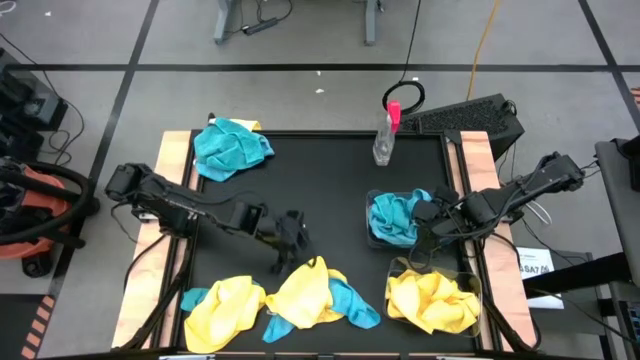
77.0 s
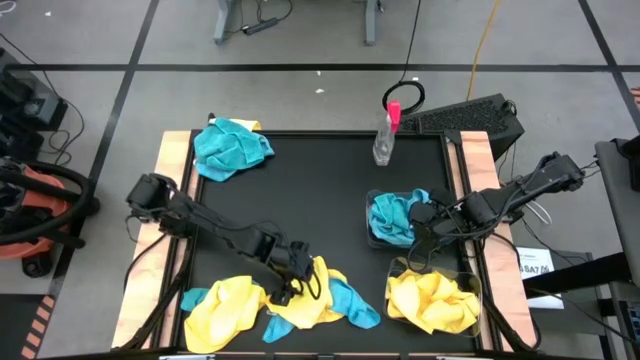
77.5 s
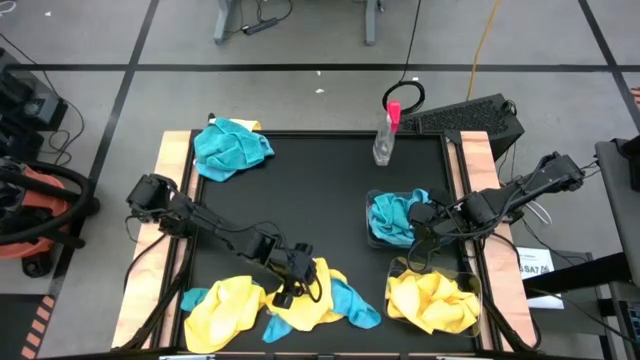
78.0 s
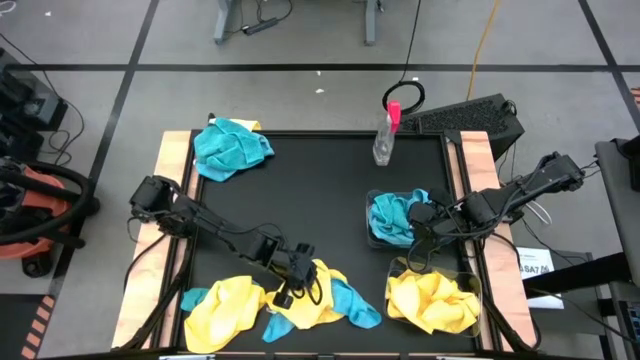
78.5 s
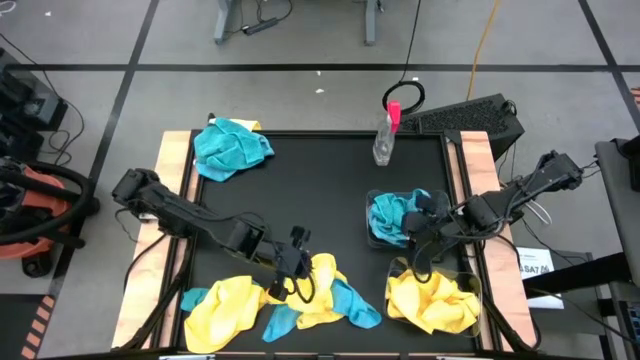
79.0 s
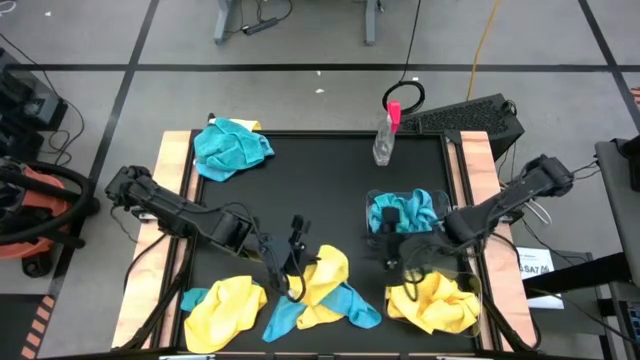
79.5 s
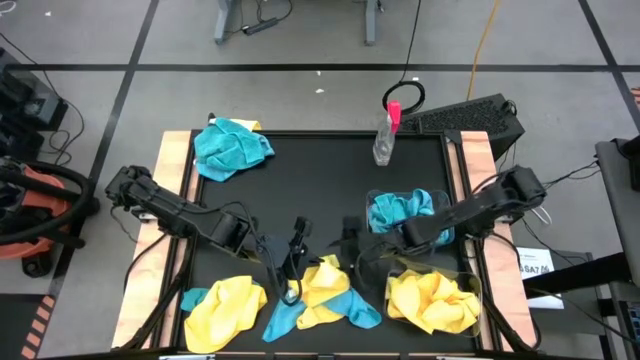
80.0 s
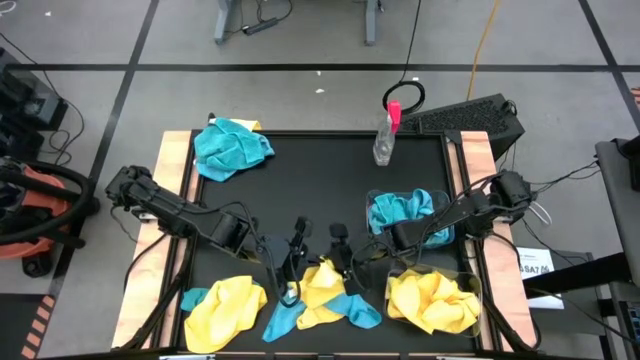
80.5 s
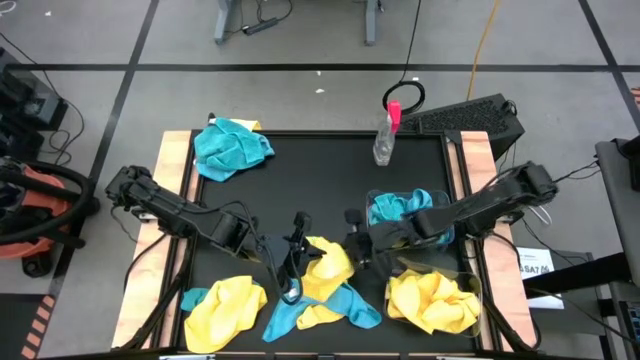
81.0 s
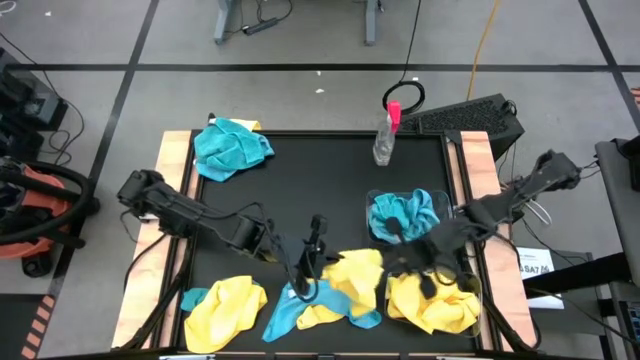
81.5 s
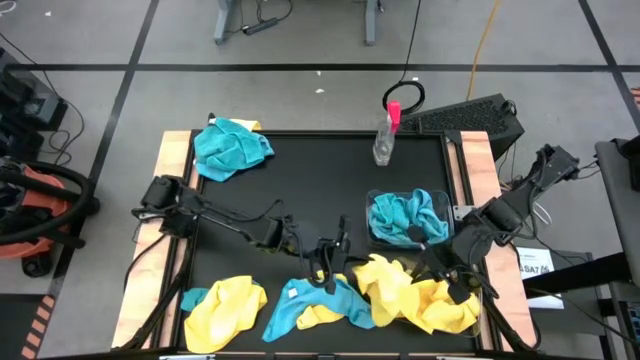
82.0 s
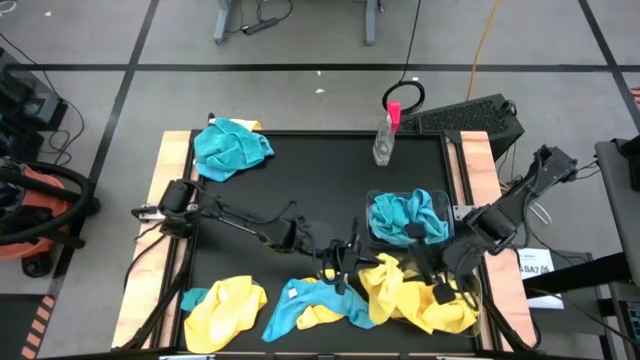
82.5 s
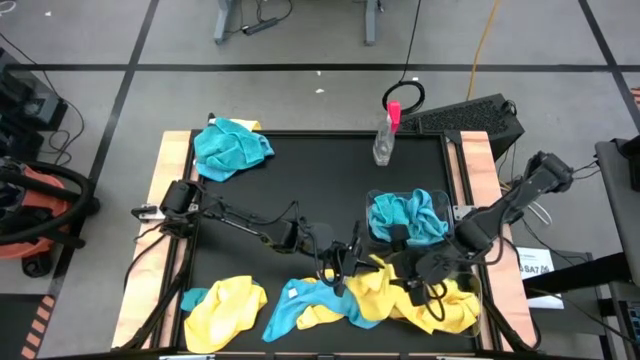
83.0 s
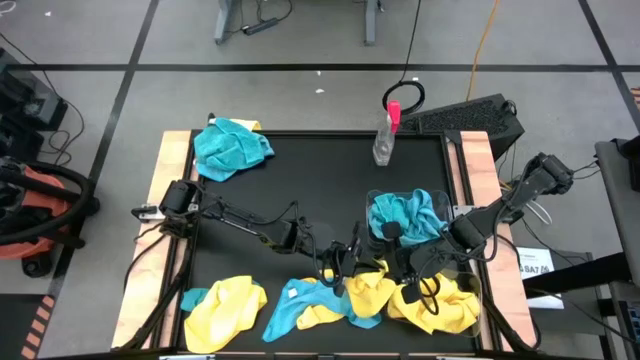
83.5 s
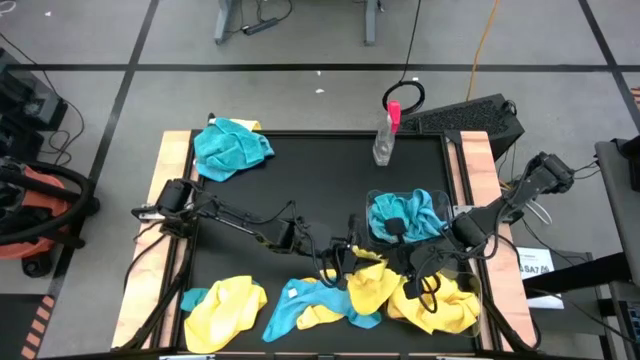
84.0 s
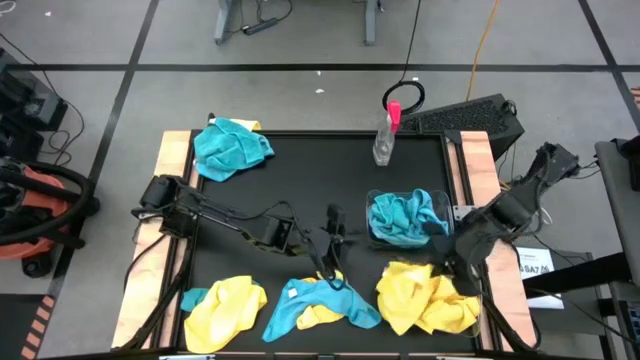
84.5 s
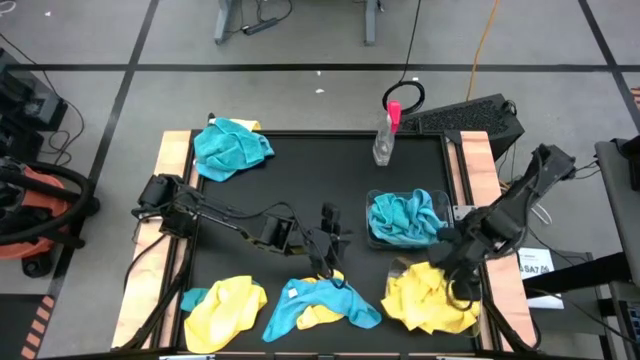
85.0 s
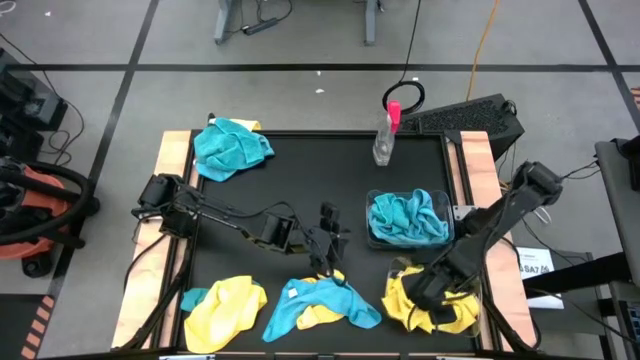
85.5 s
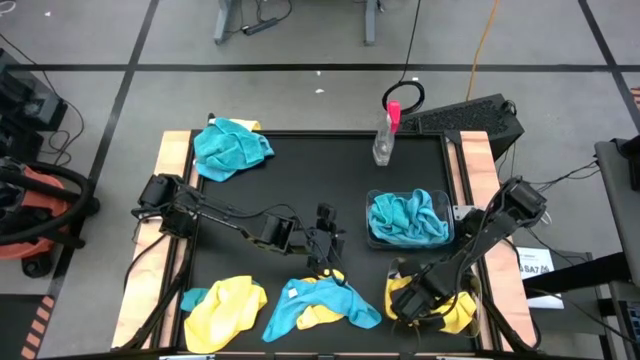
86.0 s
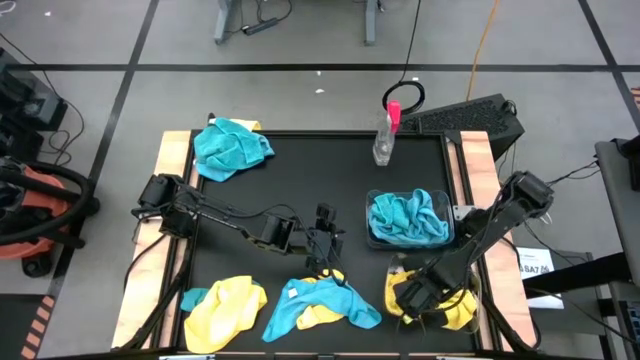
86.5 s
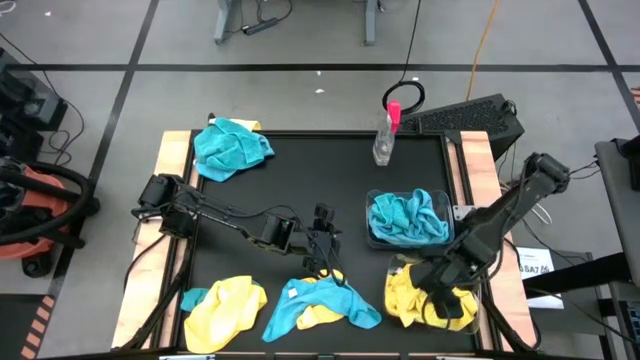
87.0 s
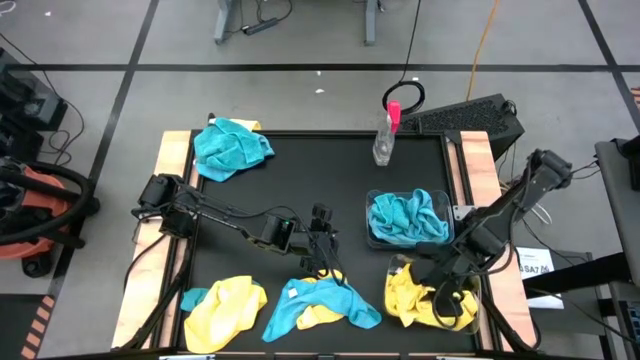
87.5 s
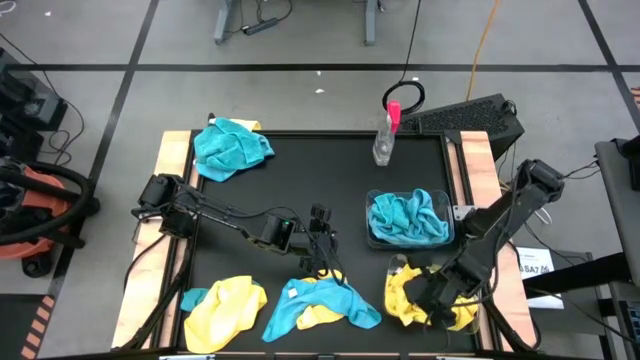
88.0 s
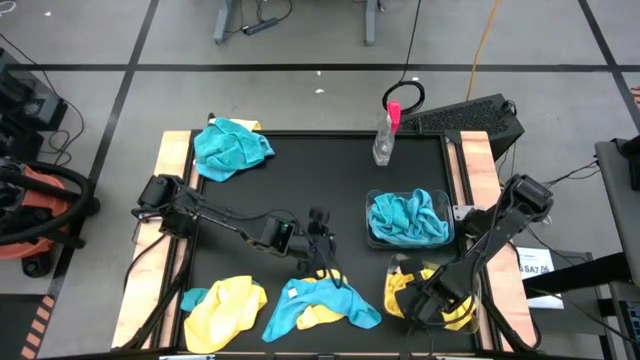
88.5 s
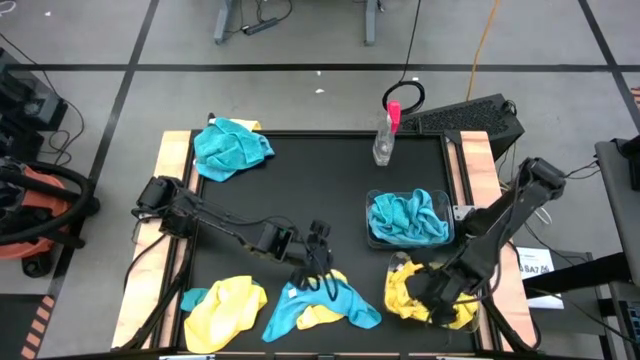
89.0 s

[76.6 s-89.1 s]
Task: Sort microfiber towel by color & place in baskets
Put the yellow towel into the bottom transparent bin

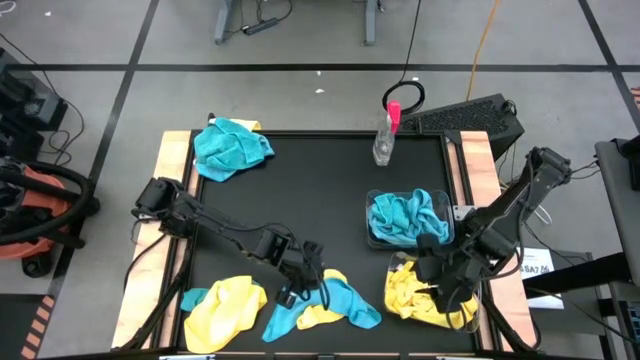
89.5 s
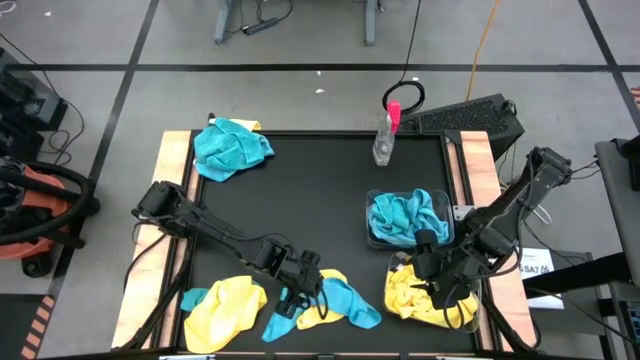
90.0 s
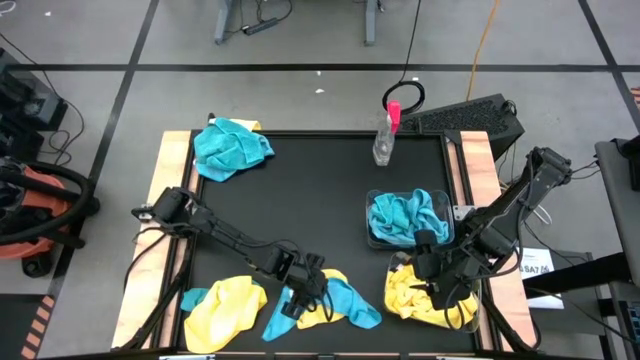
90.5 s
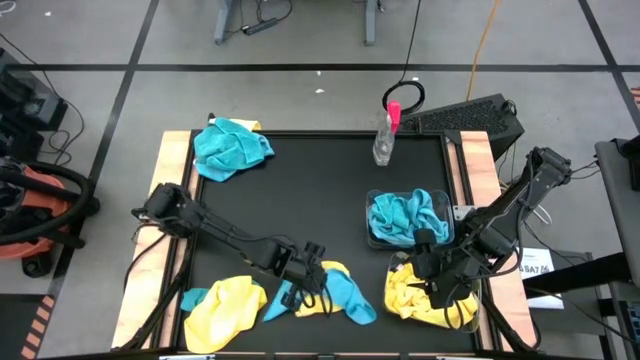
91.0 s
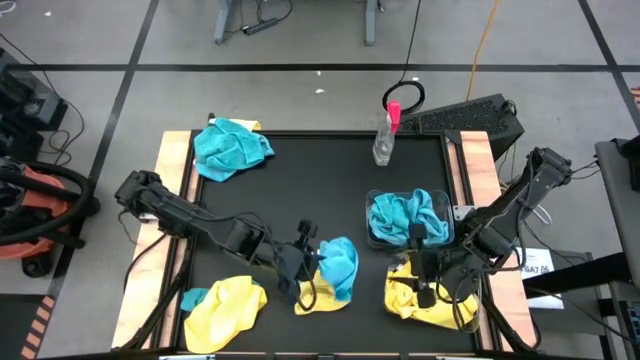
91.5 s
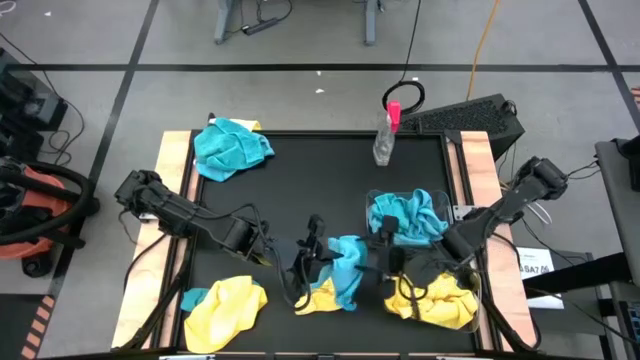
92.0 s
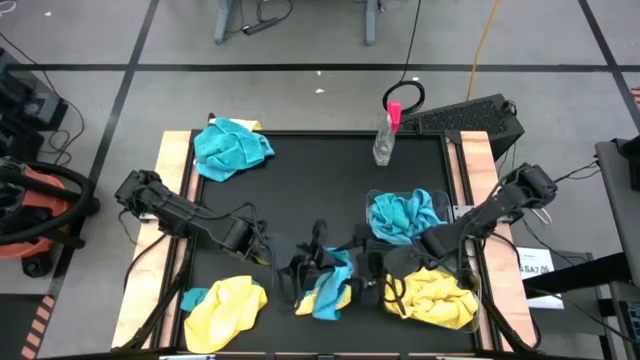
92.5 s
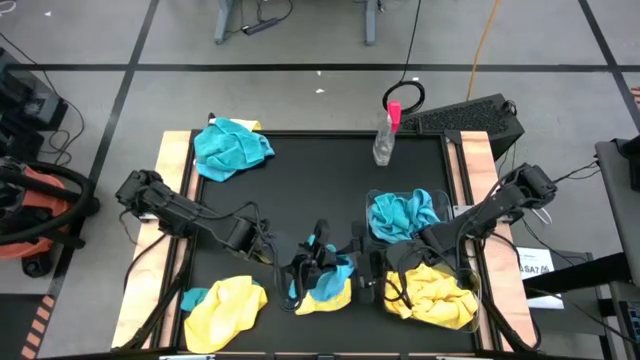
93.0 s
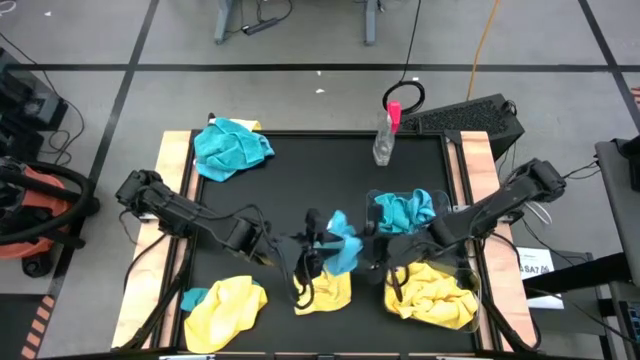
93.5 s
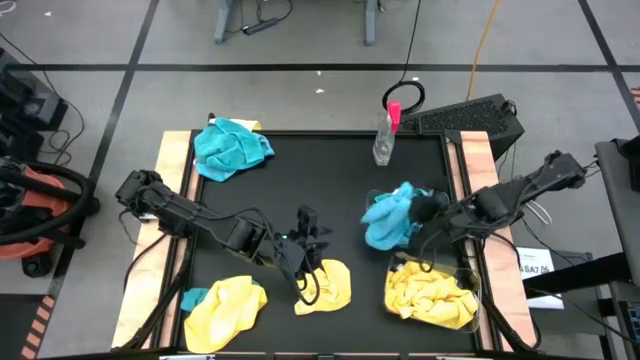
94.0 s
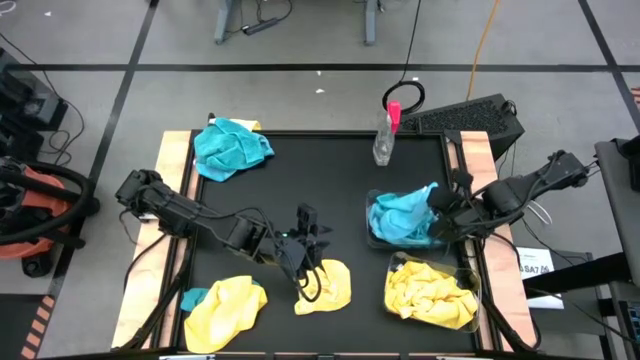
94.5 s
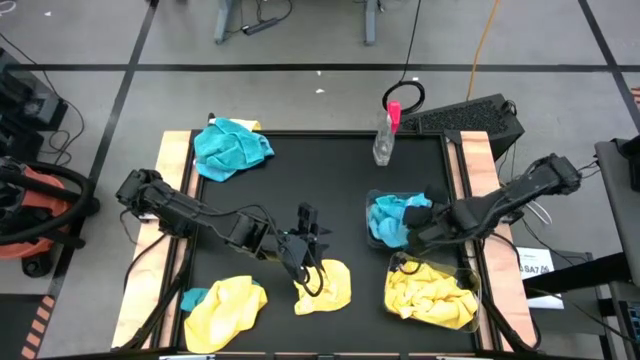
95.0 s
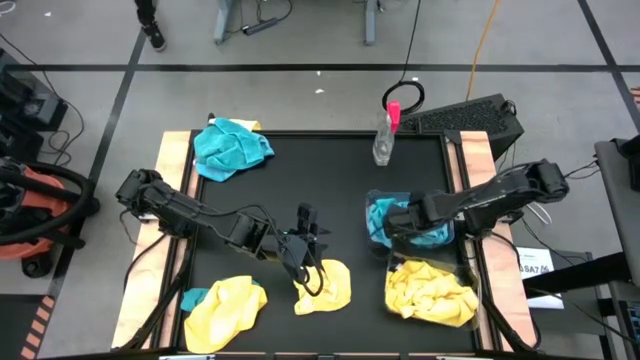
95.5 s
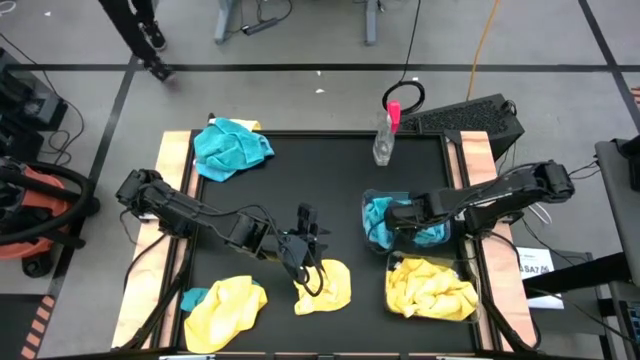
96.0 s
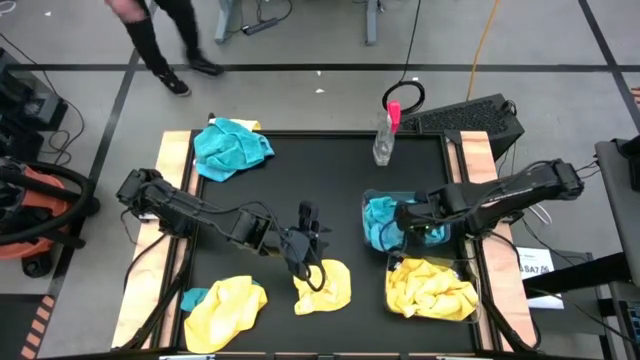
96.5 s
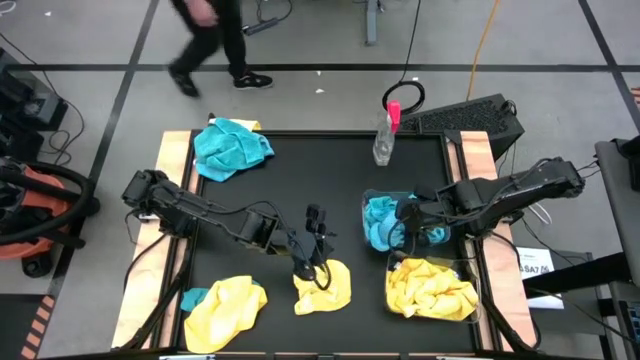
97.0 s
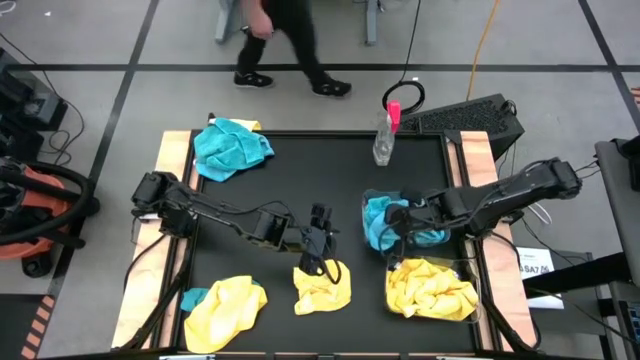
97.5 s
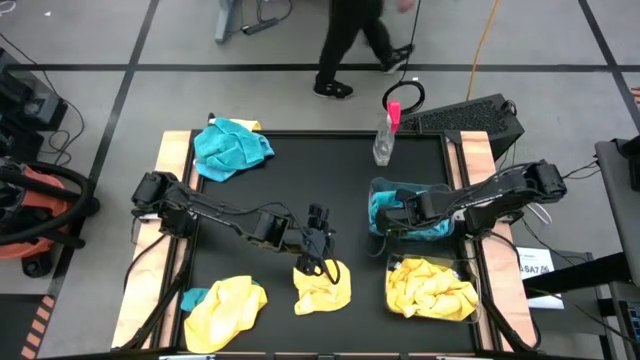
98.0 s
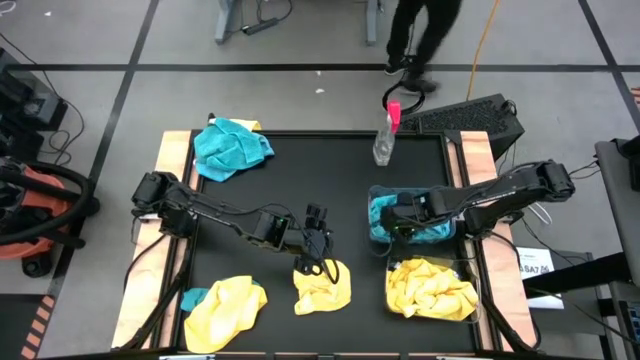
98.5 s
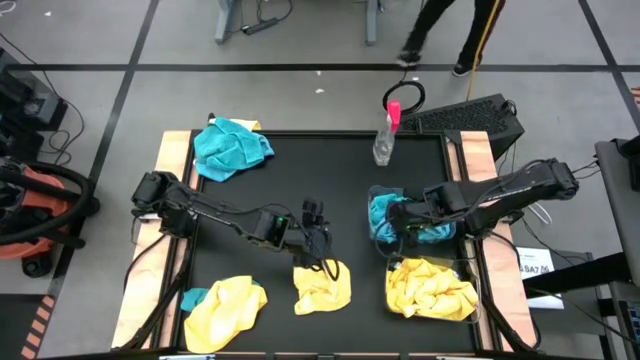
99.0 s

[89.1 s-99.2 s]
Put the blue towel into the bottom transparent bin
